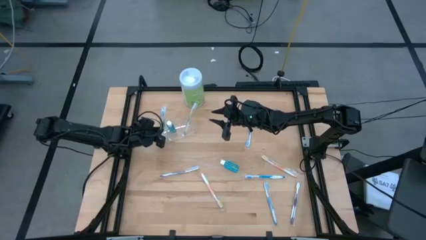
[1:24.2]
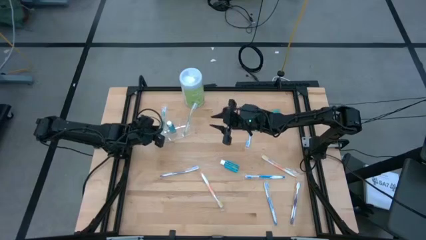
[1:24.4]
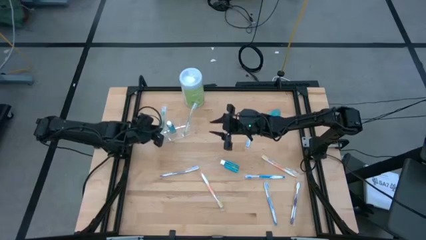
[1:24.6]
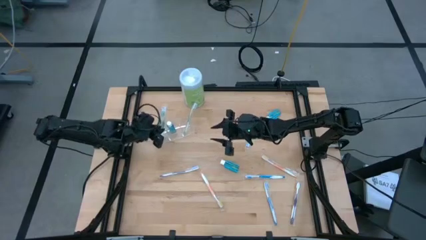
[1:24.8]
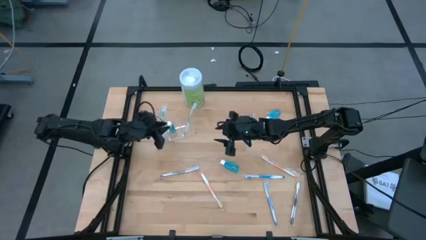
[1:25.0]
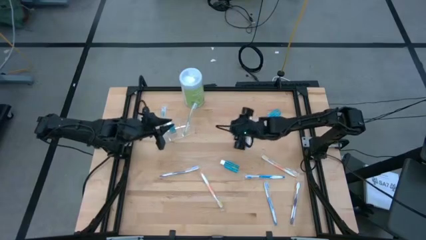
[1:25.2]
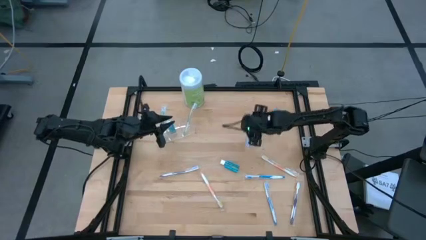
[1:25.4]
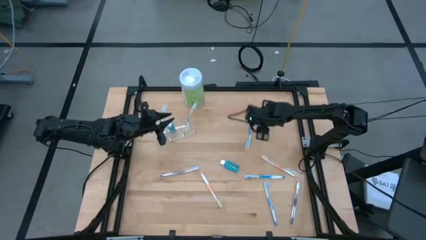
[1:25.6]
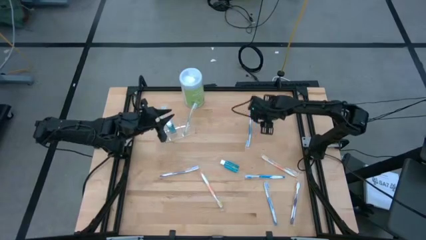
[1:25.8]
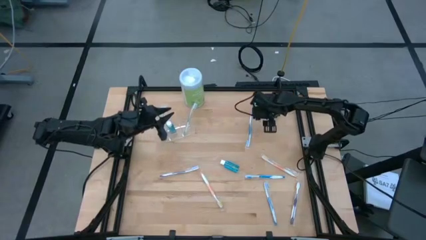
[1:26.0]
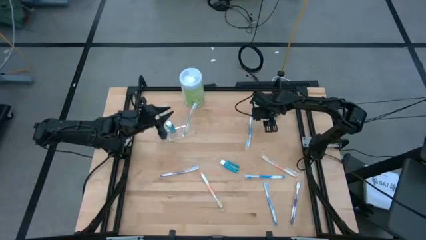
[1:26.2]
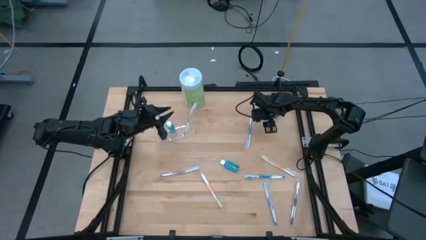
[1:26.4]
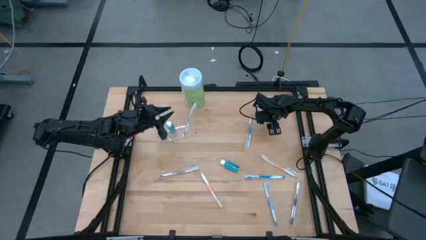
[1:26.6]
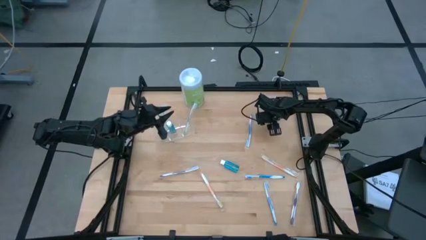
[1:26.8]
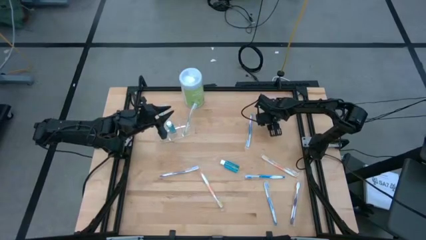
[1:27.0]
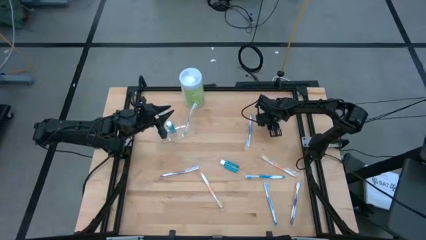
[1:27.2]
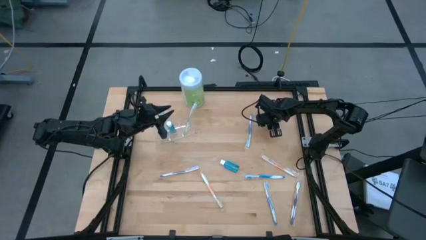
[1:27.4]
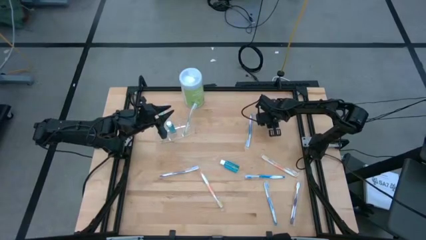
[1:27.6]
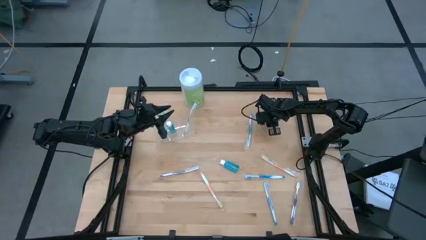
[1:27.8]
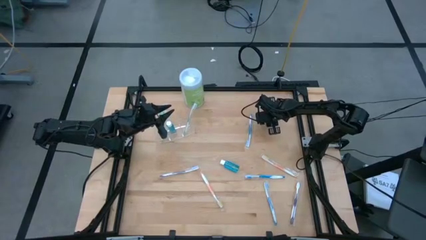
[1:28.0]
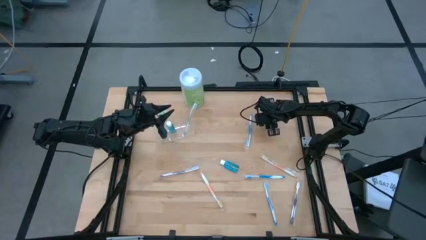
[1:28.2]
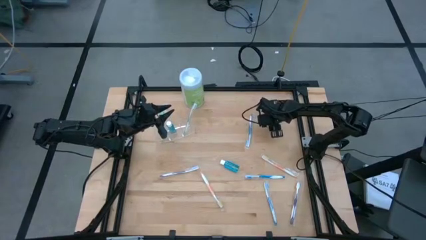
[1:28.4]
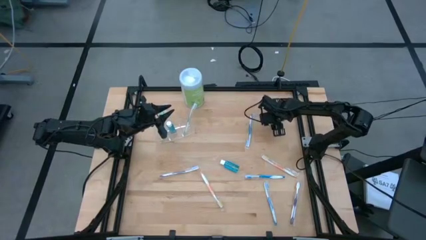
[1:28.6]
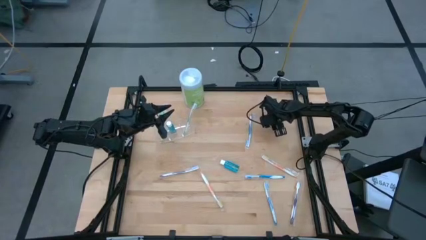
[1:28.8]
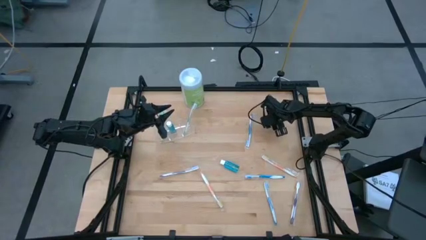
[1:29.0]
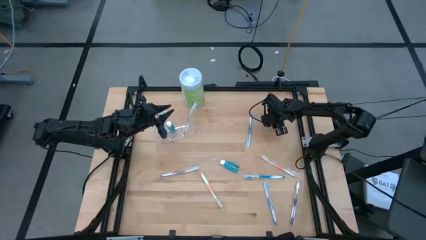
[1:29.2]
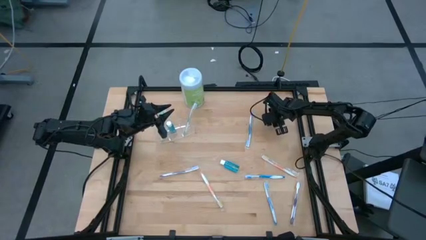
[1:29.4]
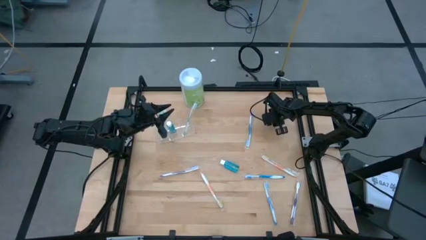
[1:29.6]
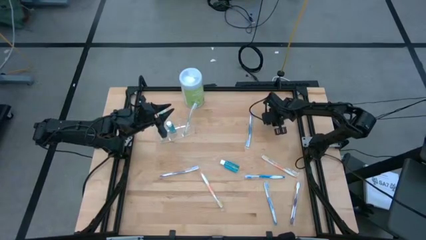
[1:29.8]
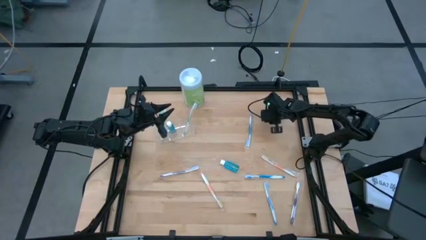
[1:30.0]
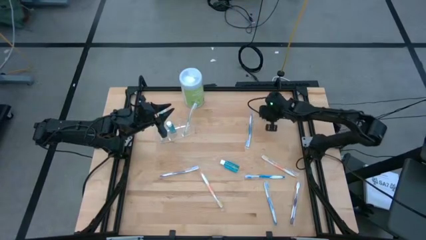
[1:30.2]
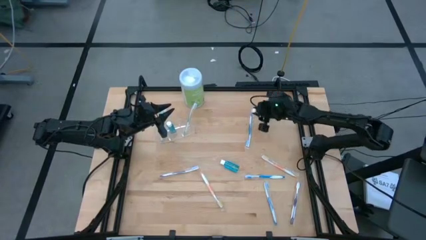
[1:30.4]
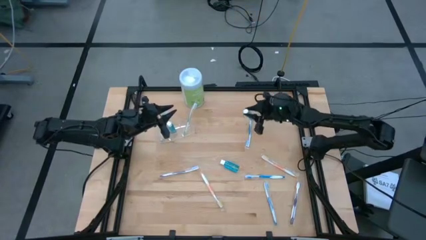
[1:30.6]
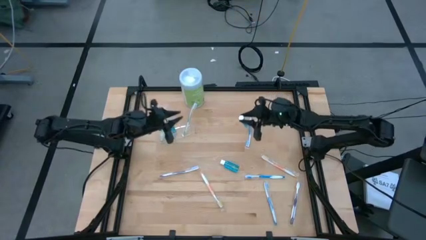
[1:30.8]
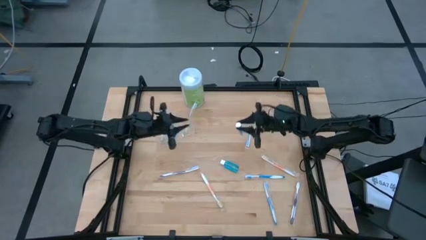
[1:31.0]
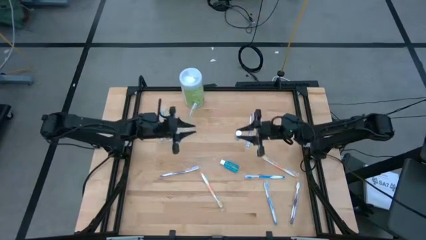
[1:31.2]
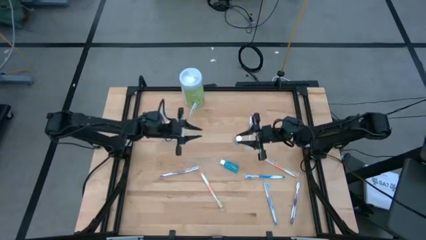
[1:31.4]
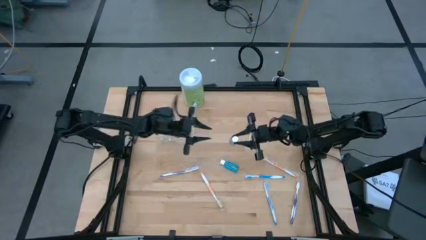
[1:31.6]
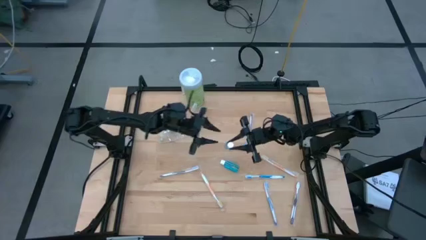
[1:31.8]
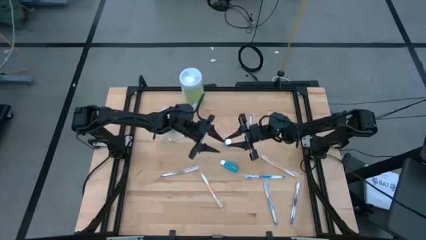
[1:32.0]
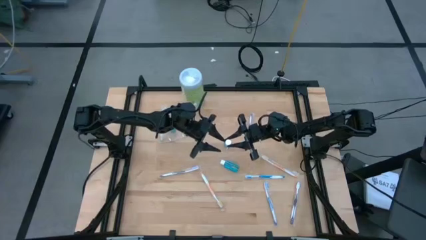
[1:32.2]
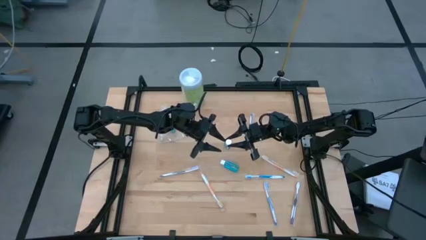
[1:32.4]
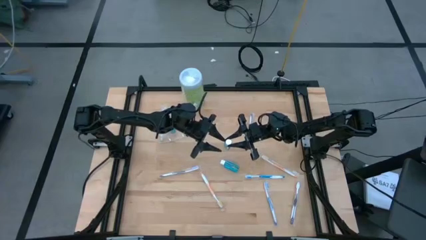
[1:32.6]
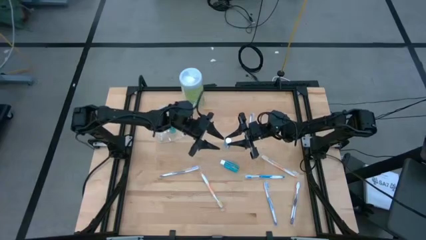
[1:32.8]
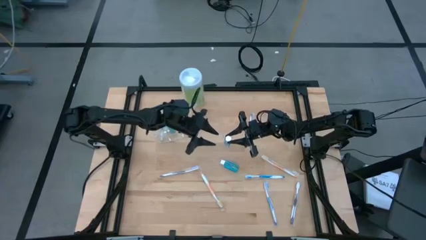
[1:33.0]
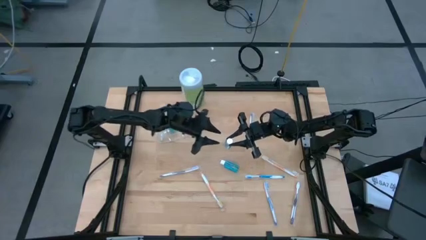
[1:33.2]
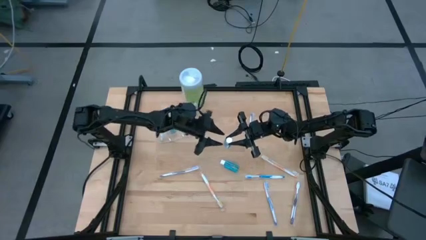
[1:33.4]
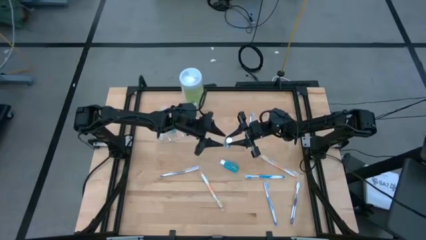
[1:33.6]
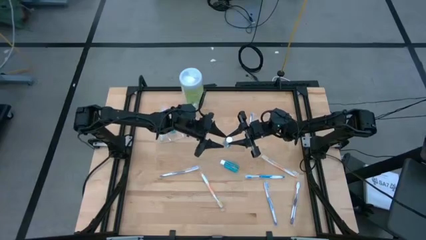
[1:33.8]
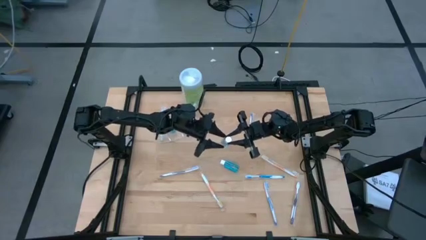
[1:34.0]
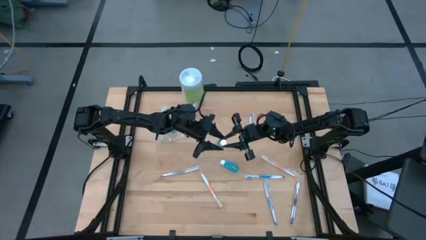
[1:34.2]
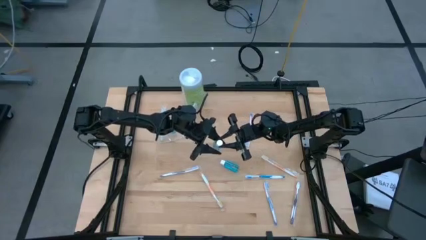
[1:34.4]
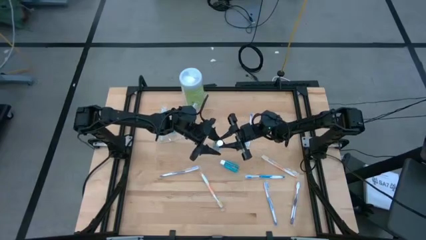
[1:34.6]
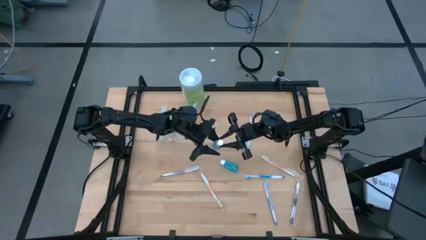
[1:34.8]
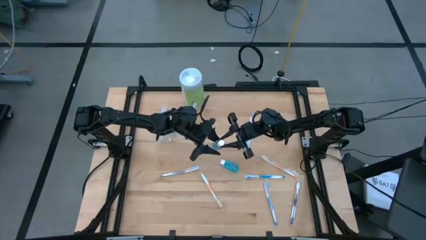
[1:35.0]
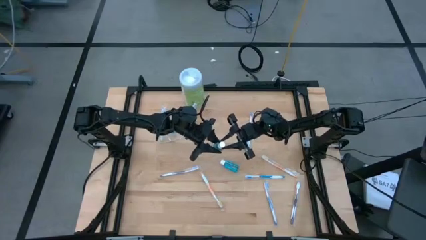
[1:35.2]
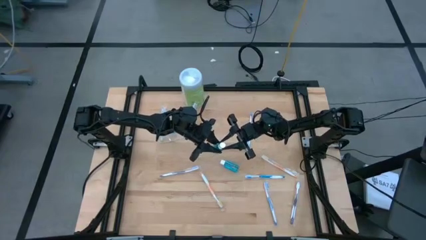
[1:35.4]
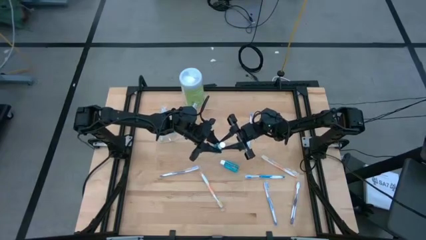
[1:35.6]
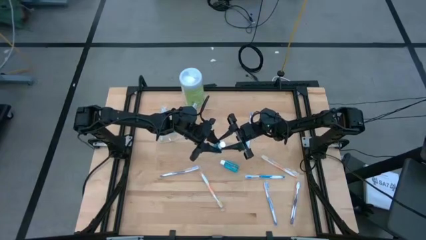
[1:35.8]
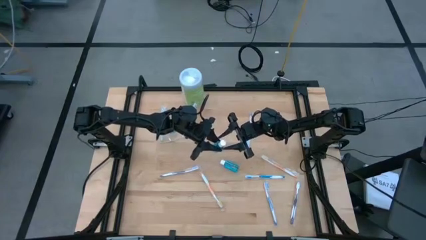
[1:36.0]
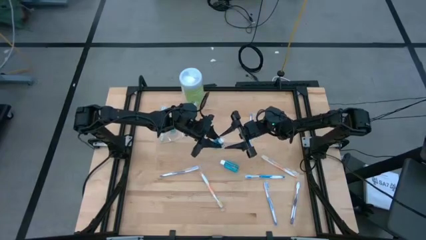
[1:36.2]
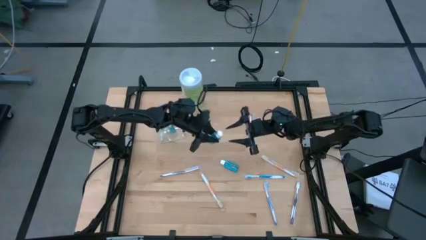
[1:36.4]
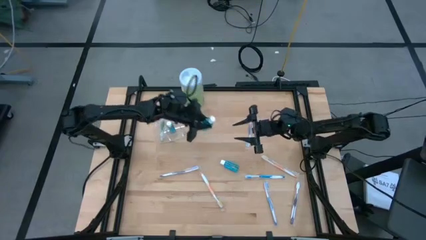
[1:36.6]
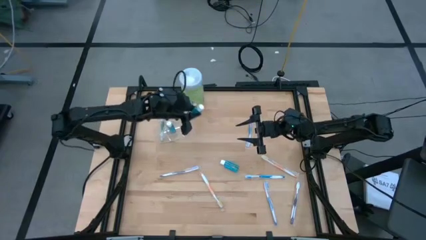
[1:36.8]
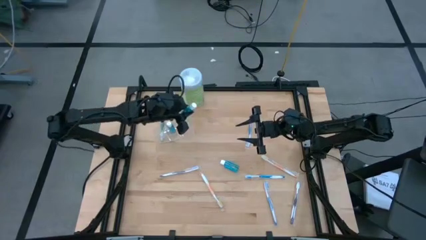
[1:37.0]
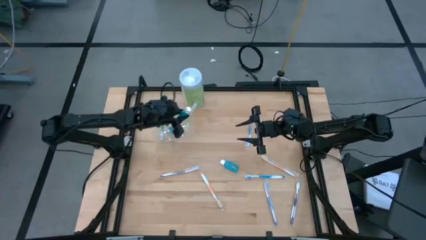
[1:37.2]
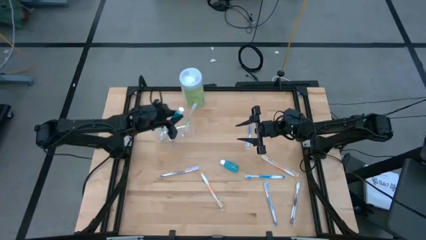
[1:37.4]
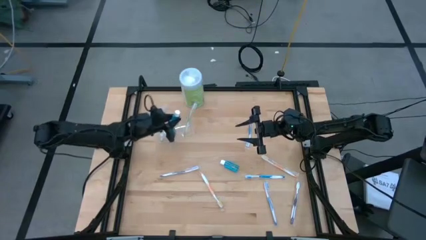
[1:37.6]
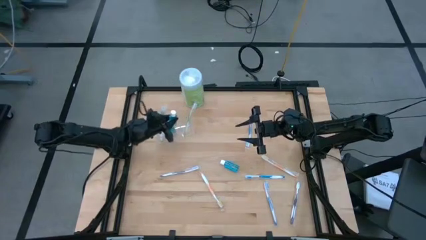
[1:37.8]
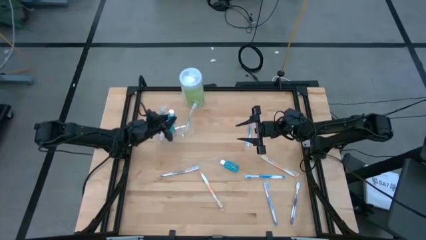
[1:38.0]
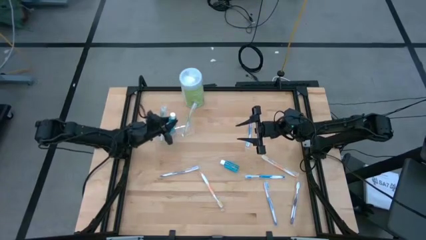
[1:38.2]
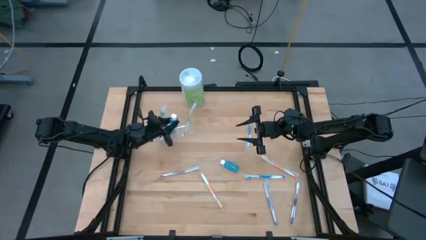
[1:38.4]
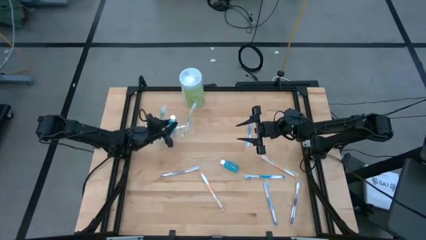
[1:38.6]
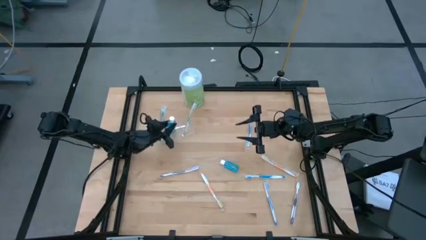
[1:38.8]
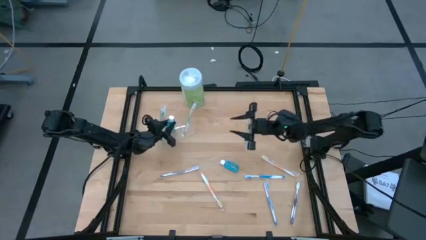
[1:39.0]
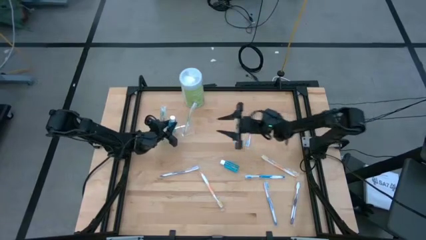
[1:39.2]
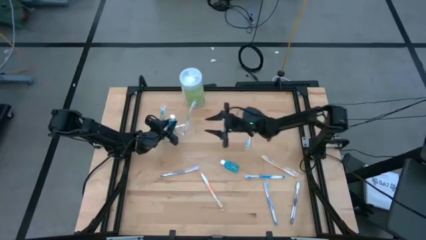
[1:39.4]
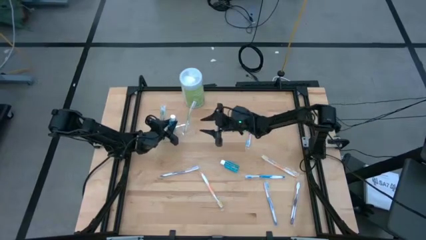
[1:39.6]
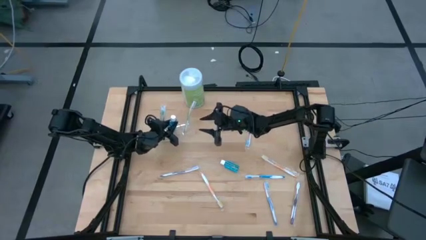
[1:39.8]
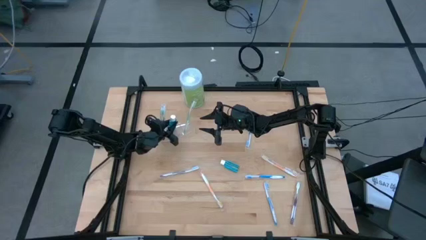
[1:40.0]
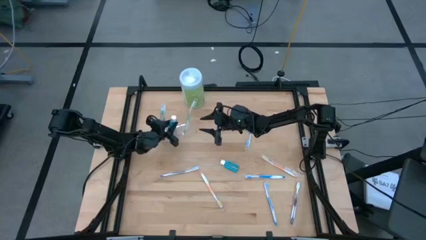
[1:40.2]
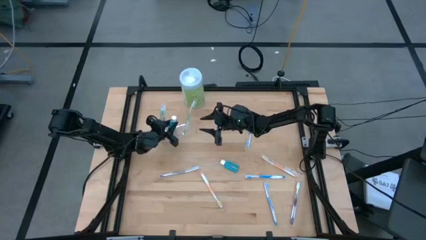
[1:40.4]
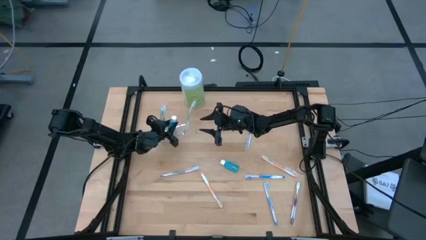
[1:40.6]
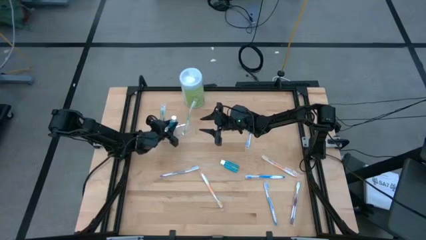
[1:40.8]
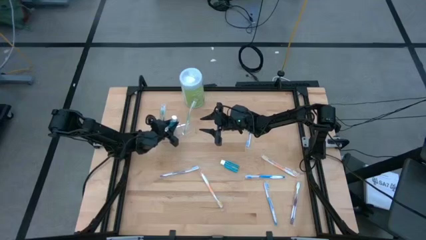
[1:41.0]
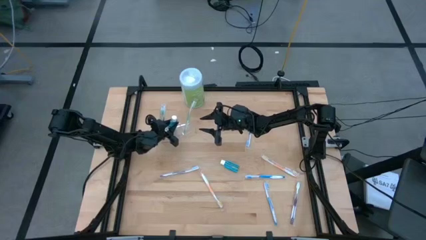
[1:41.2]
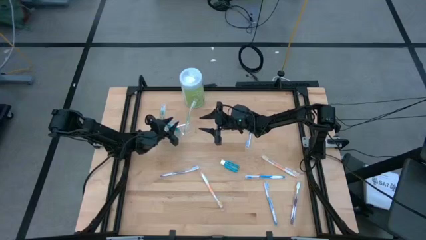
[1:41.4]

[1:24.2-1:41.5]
Task: Pick & Place toothbrushing station
Put the top blue mouthwash into the transparent organizer
